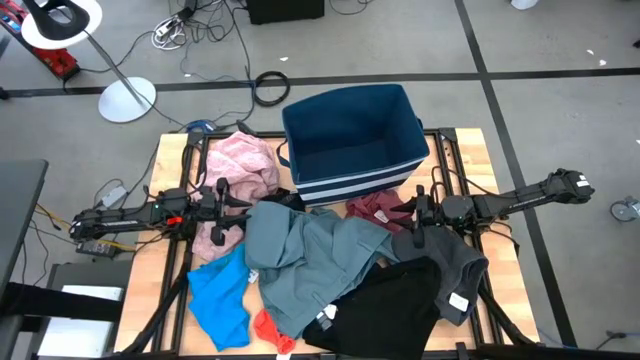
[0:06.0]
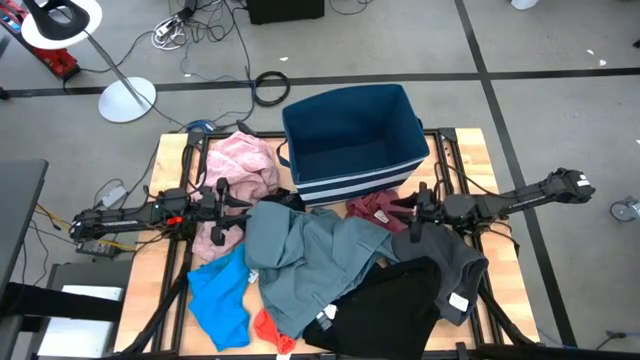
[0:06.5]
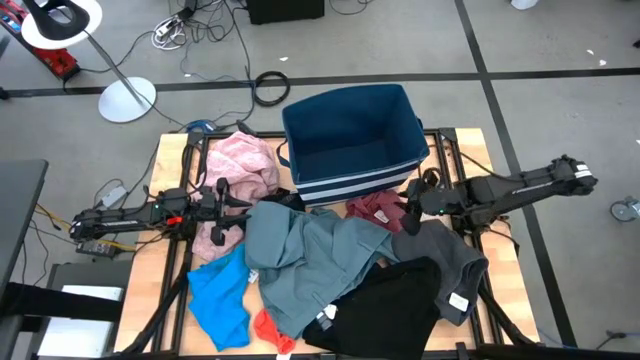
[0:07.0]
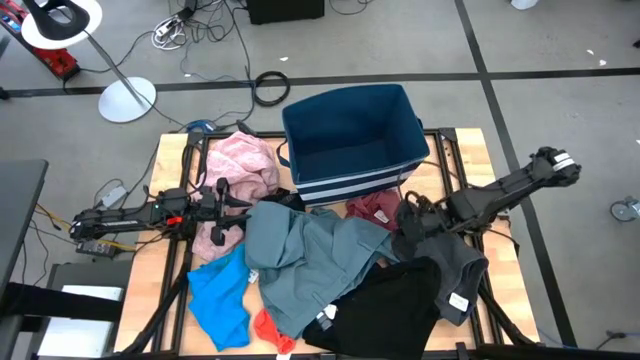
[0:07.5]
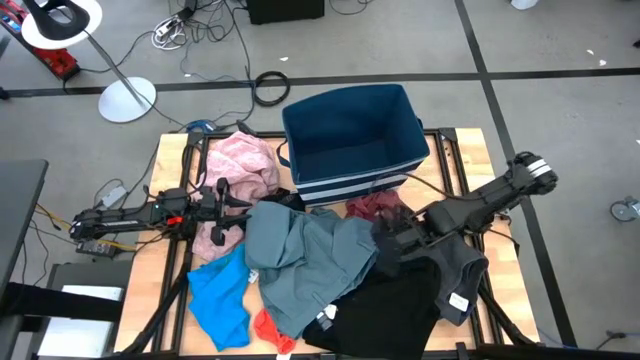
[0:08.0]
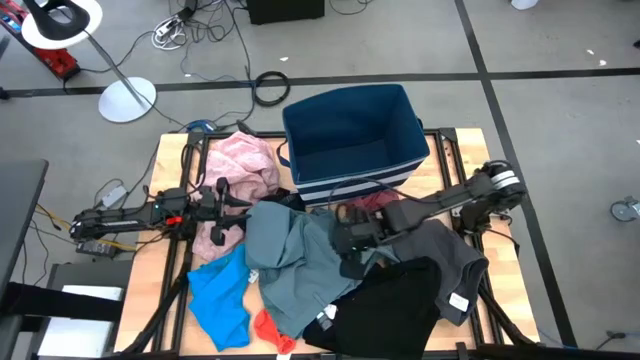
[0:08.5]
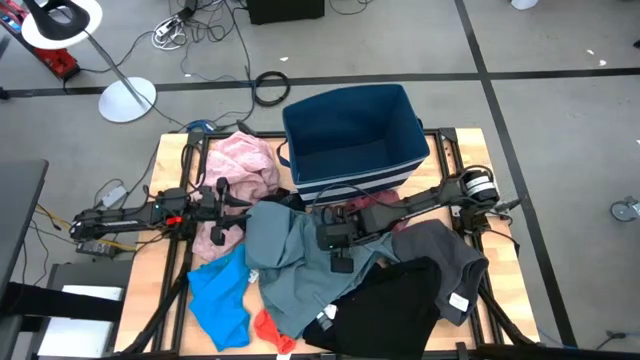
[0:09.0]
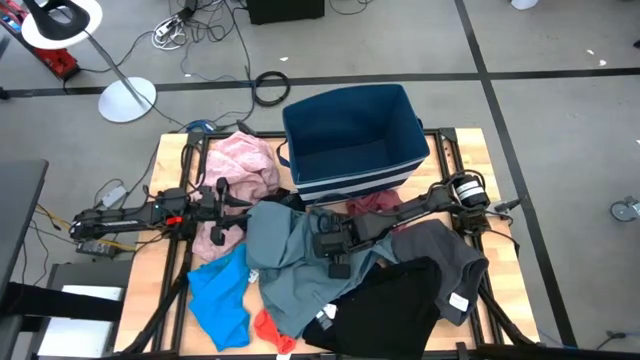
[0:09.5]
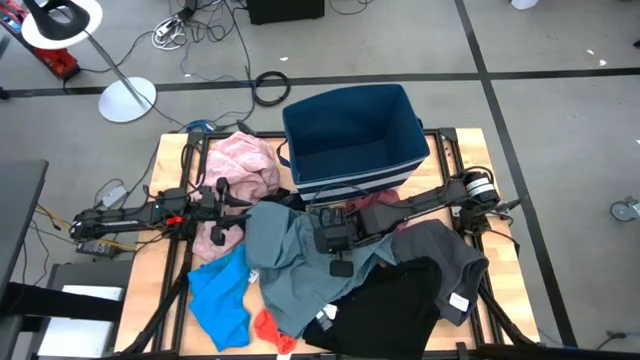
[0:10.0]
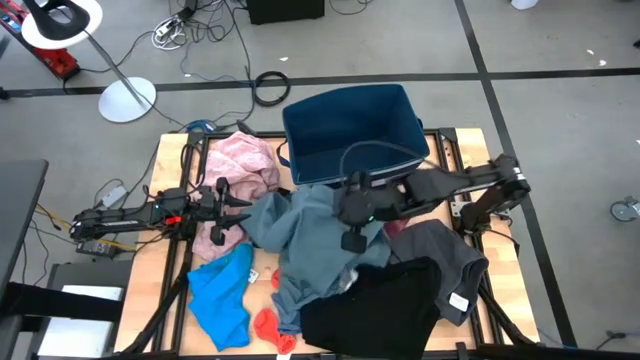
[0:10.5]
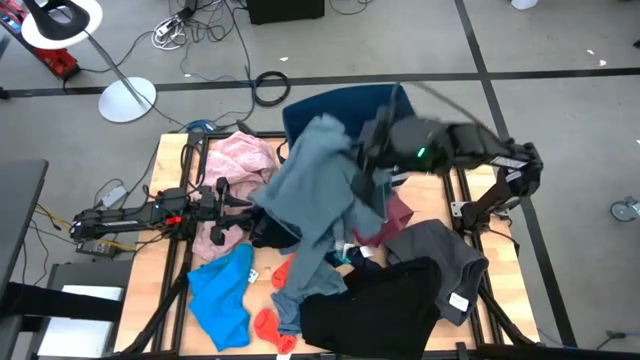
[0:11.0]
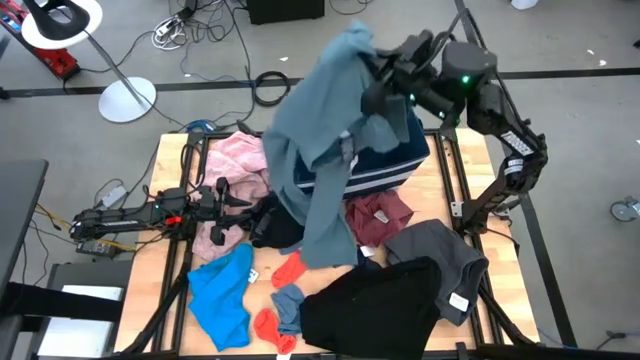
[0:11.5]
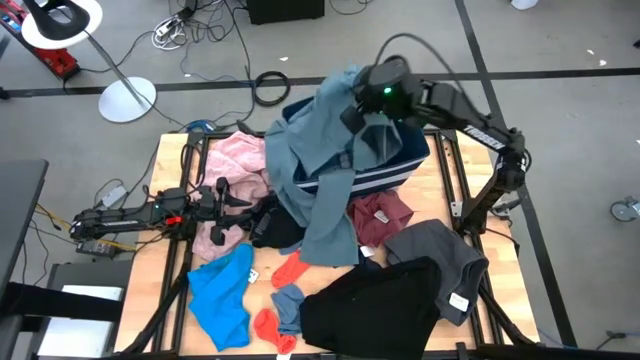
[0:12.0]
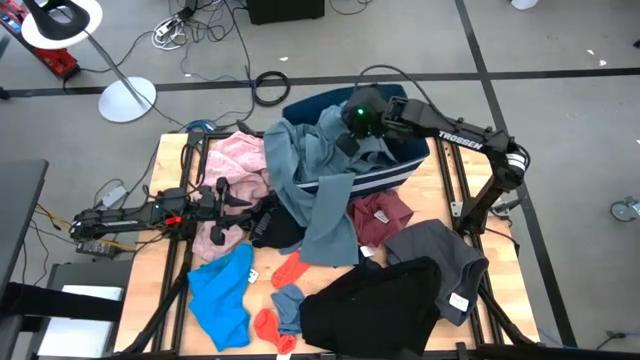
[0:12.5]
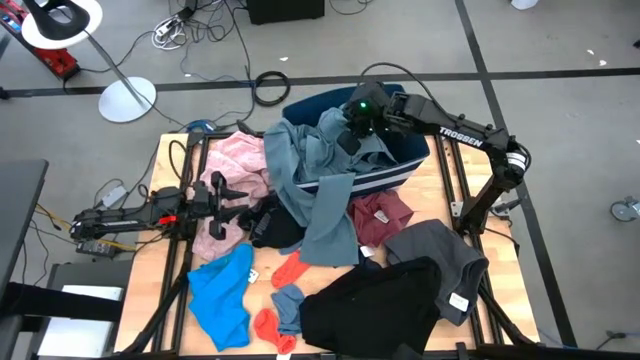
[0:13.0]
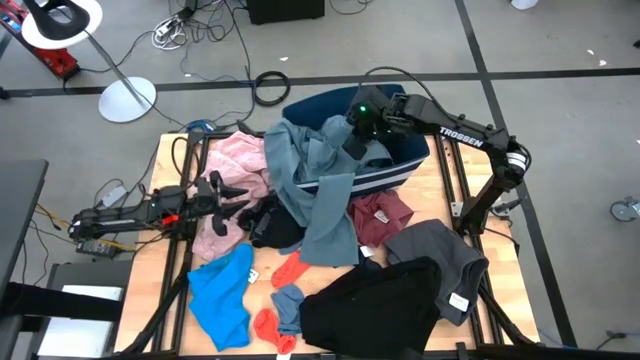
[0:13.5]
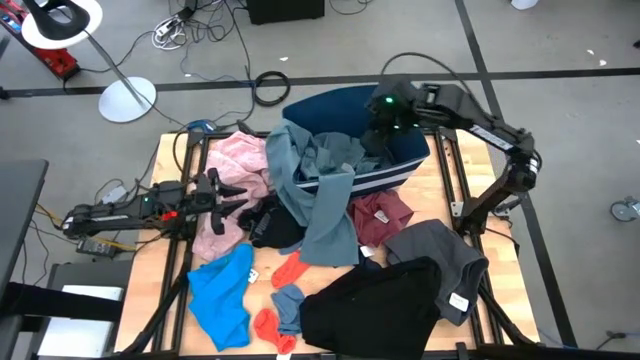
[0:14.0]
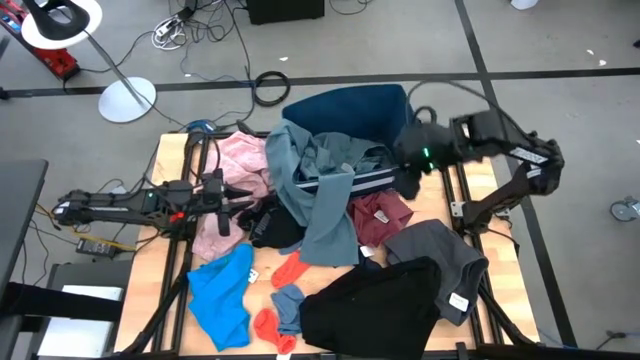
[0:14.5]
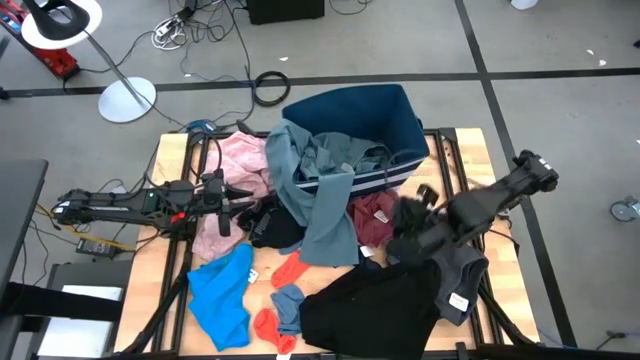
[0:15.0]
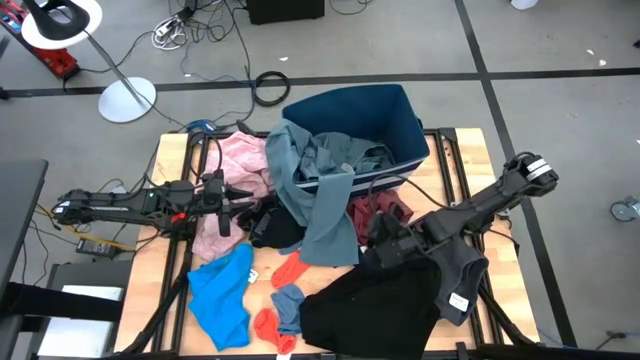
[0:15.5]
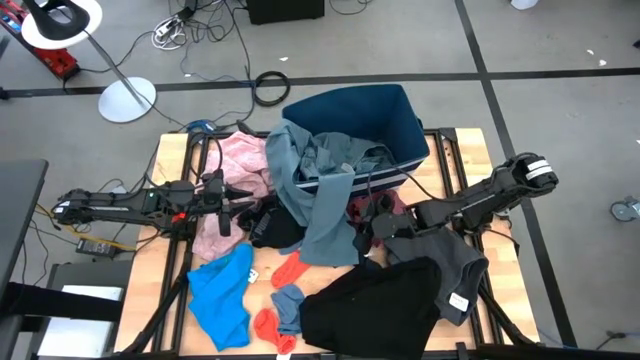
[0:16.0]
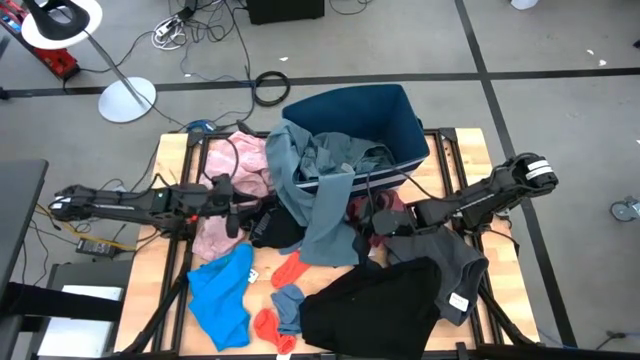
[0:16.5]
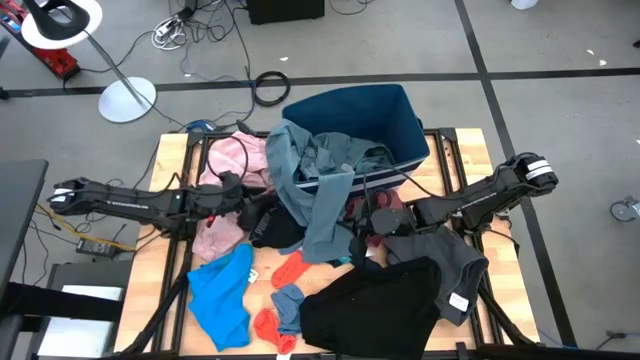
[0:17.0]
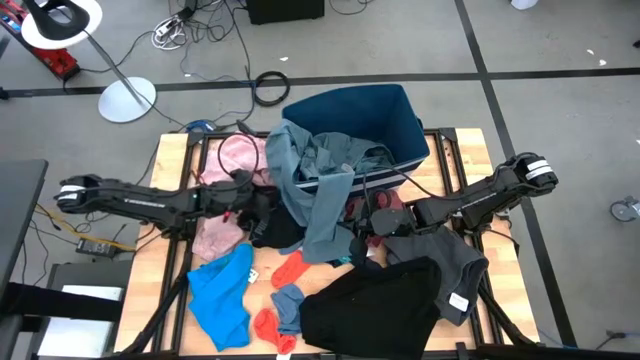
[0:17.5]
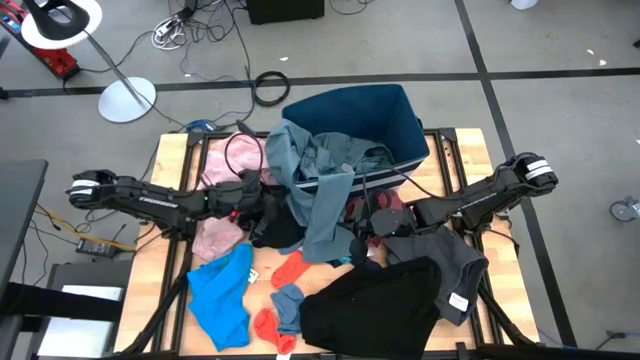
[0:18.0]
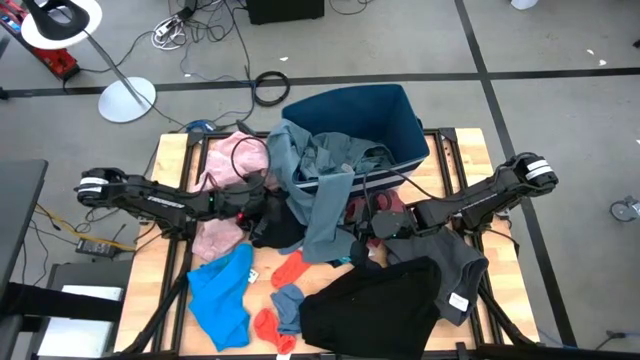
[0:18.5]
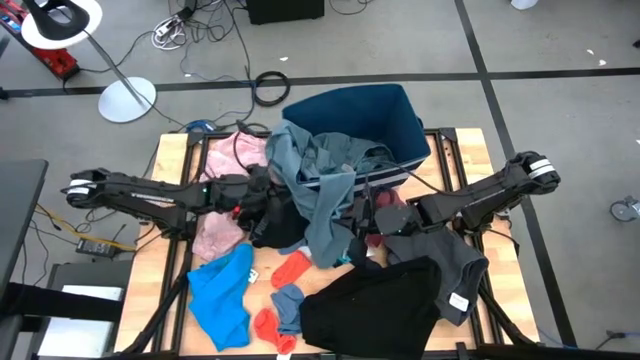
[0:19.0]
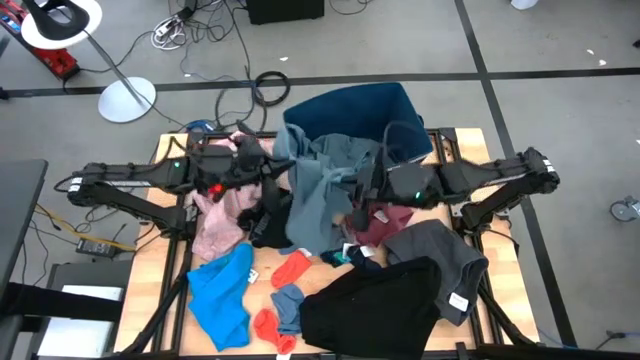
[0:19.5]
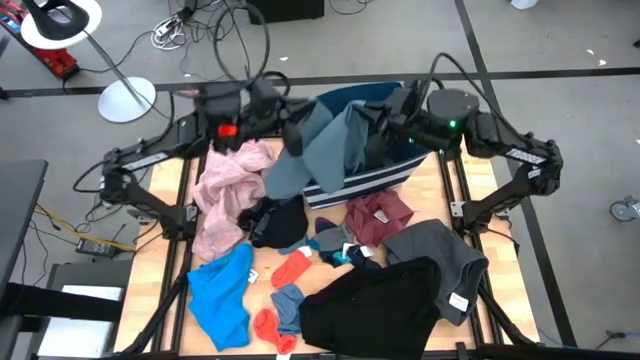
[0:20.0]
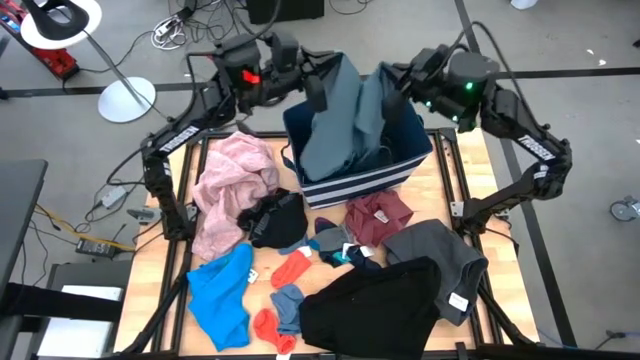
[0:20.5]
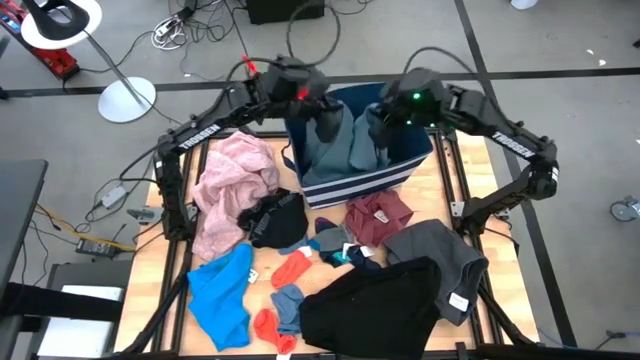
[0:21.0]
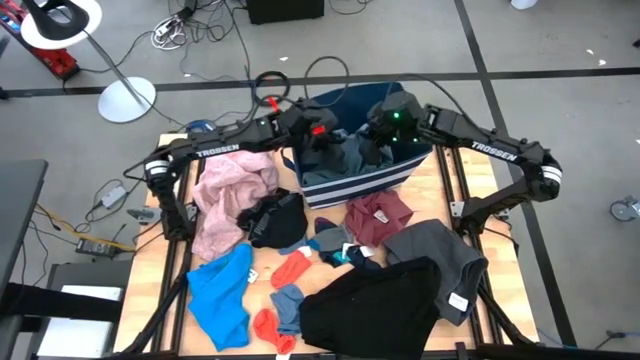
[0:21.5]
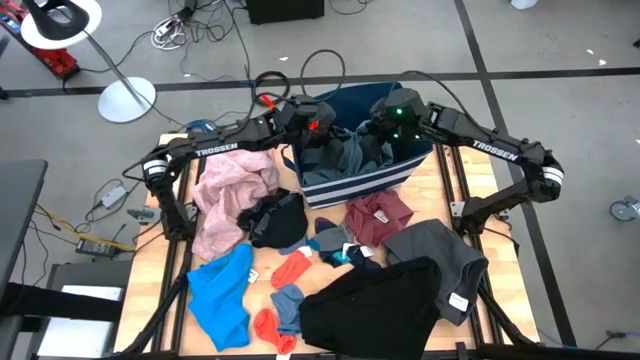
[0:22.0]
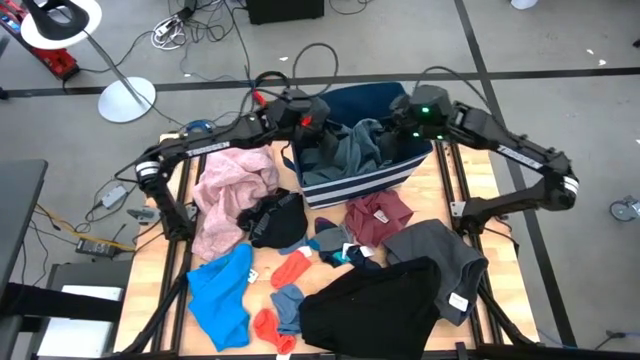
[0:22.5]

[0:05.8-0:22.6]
Task: Sort clothes
Put the blue long pants in the blue laundry bin organizer

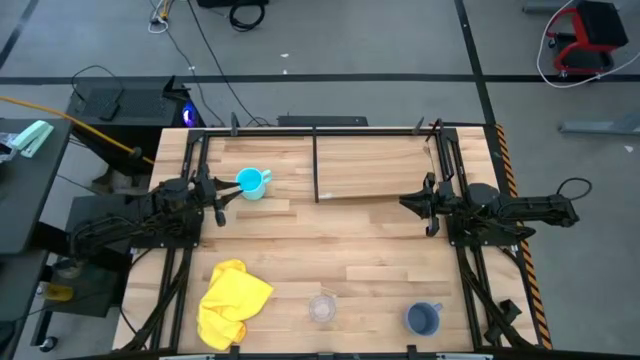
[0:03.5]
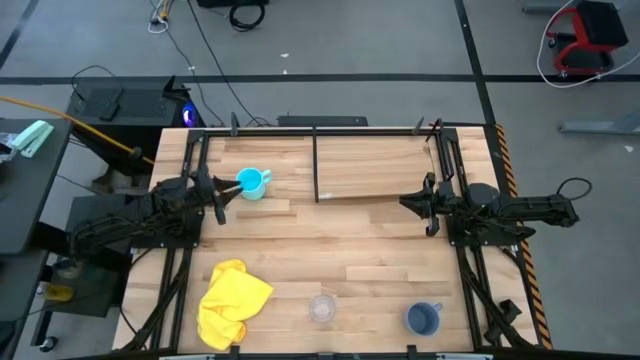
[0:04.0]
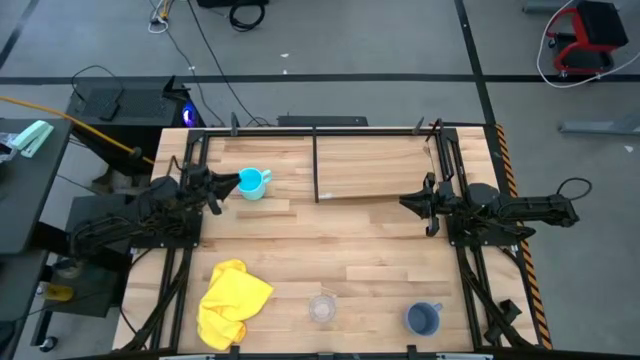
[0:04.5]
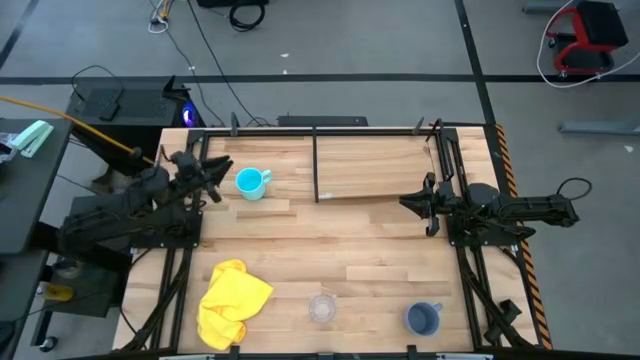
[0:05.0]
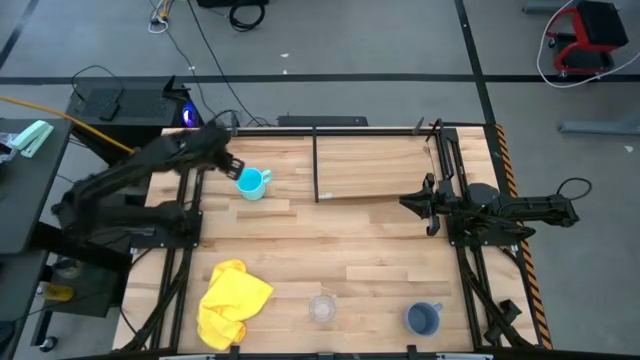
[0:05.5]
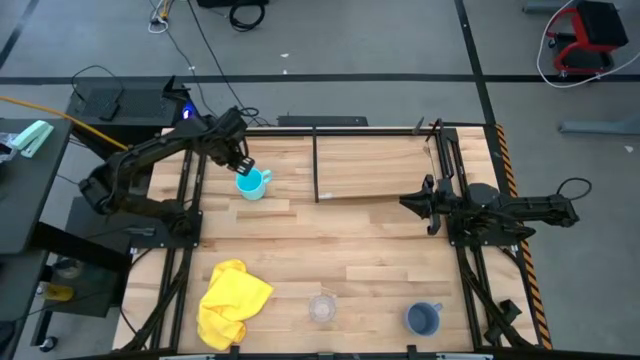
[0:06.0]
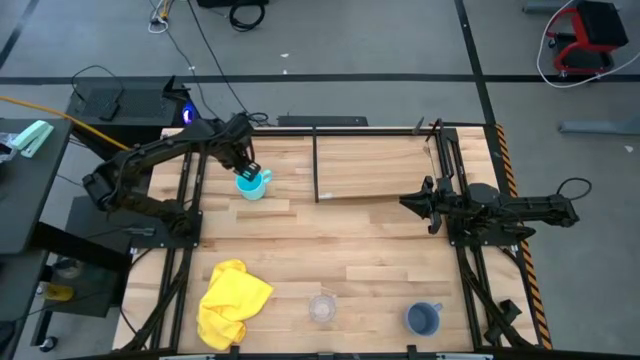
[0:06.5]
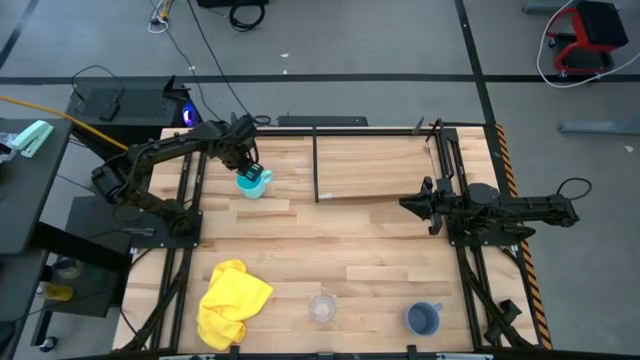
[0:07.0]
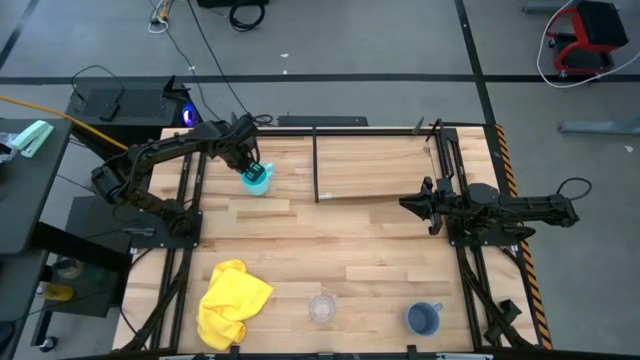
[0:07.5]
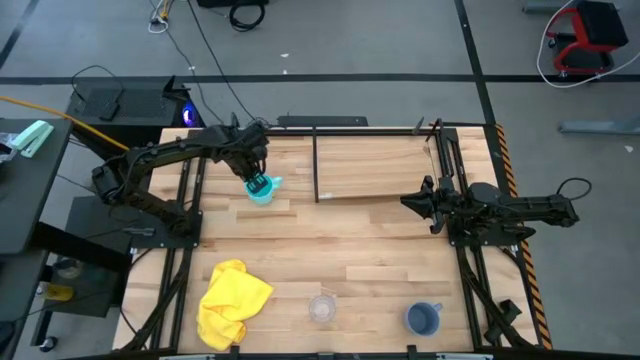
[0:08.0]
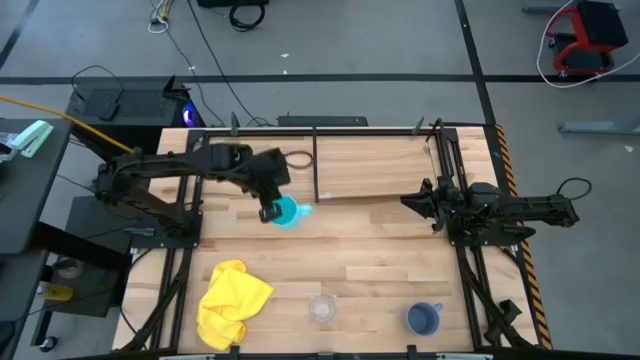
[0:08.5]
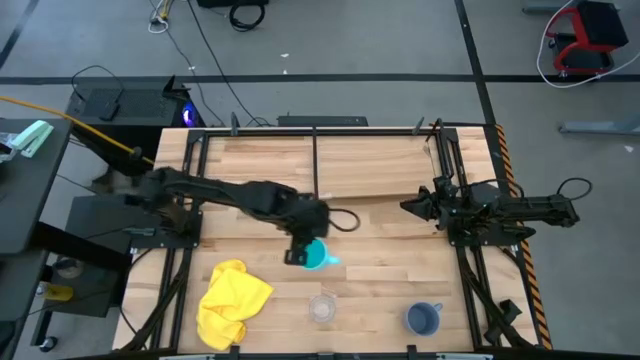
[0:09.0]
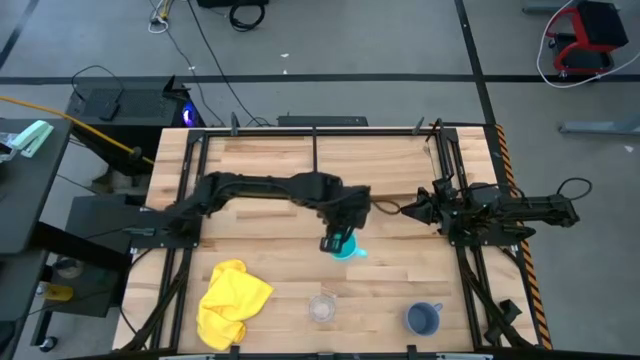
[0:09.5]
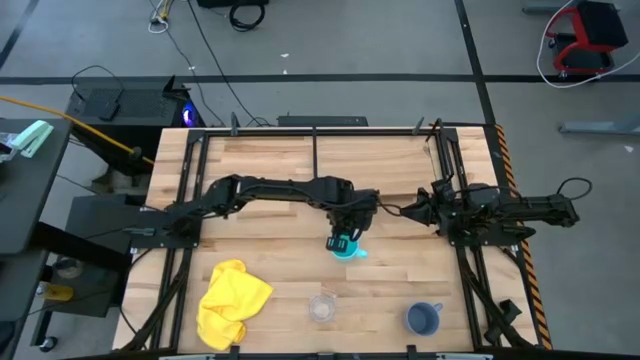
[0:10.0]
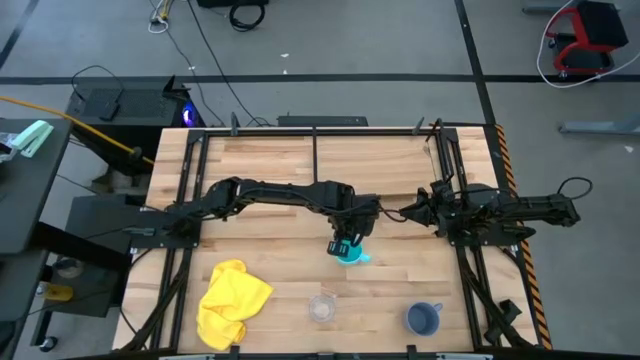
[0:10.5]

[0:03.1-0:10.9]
Task: Stack small to large cups/mugs on shelf
Move the light blue mug to the middle of the table
